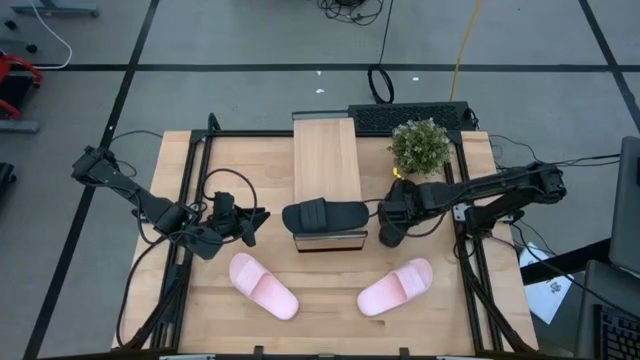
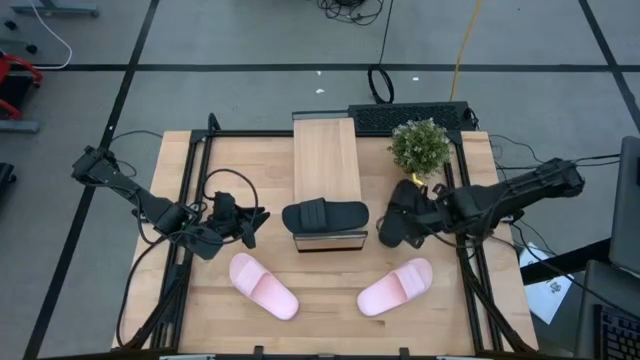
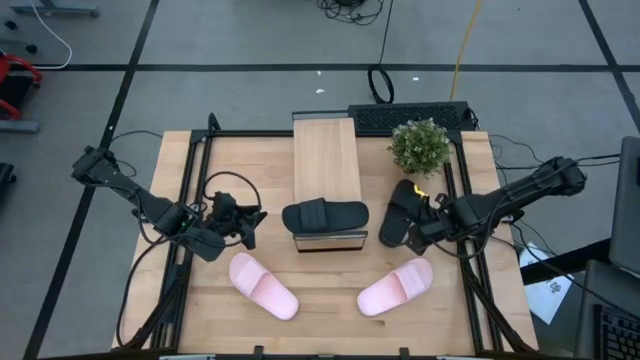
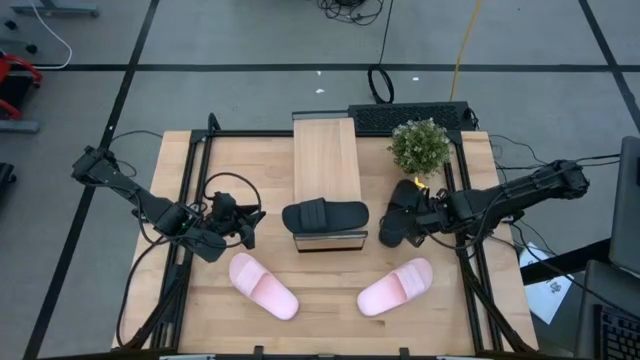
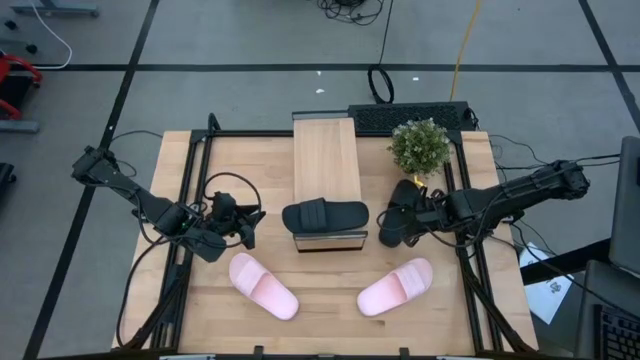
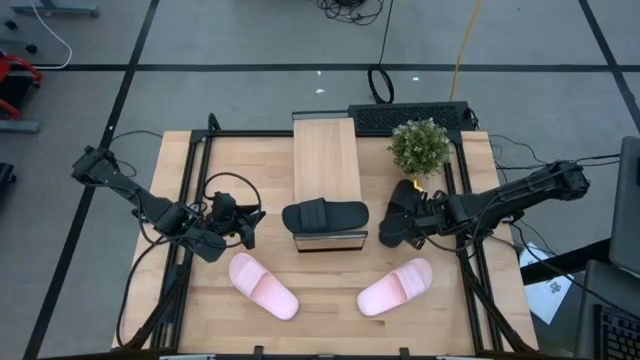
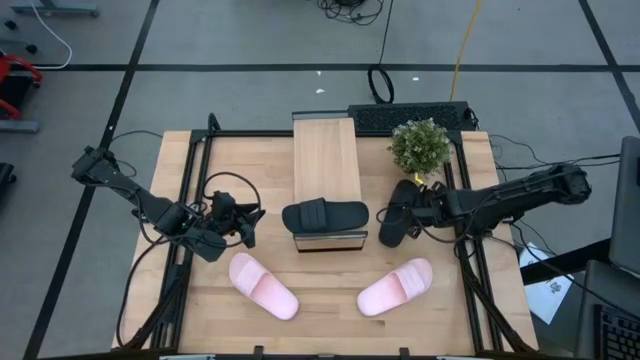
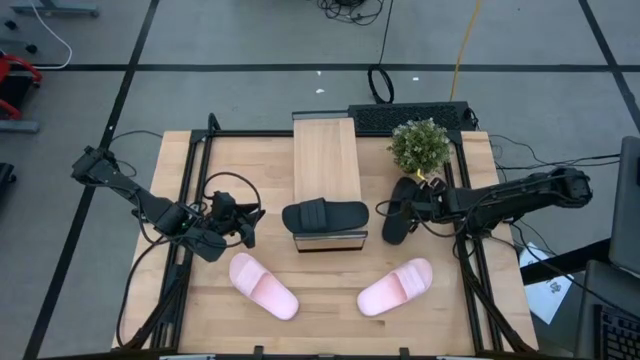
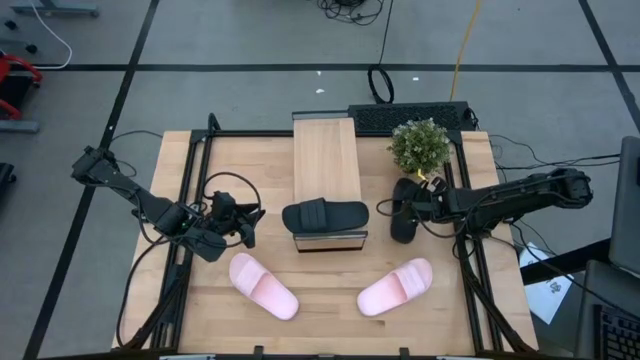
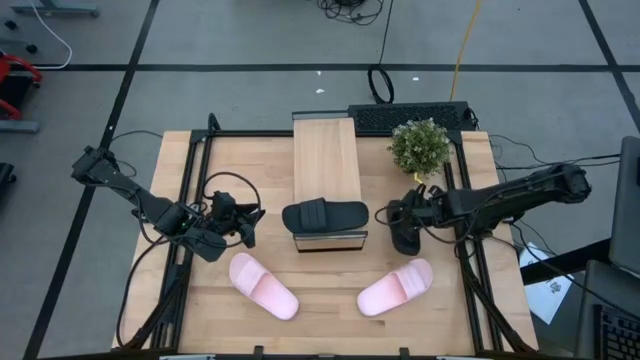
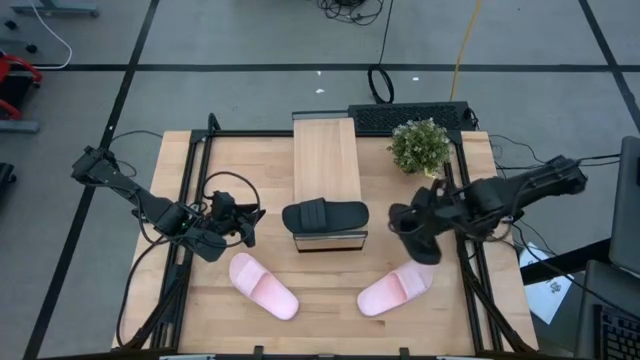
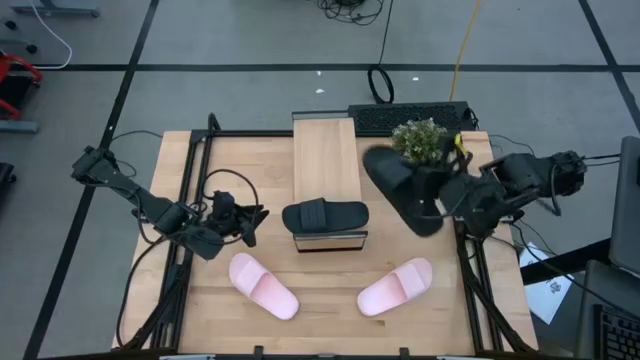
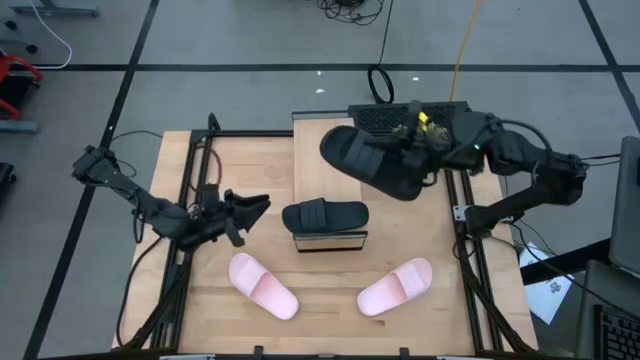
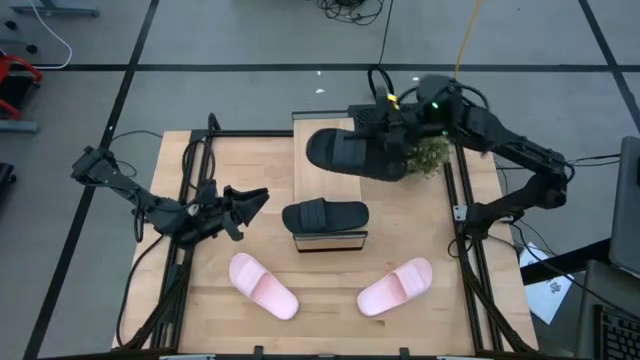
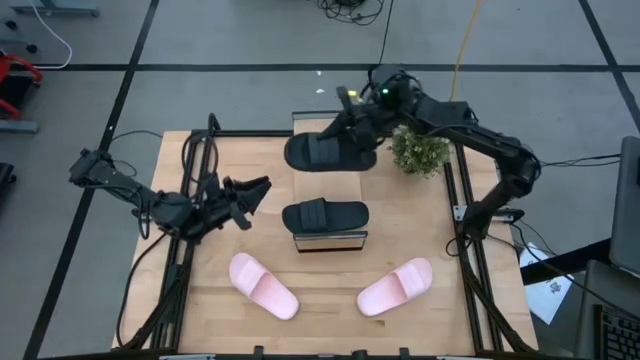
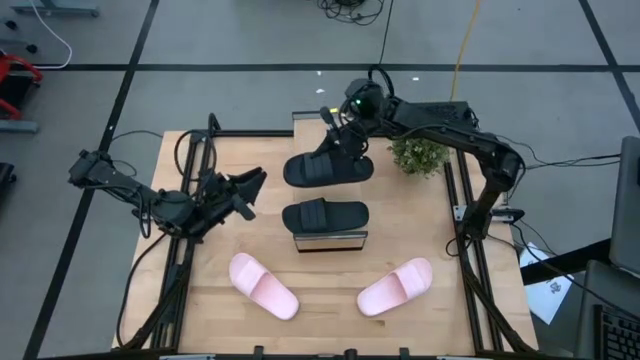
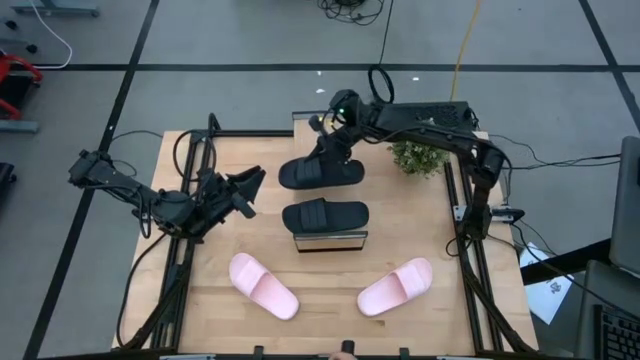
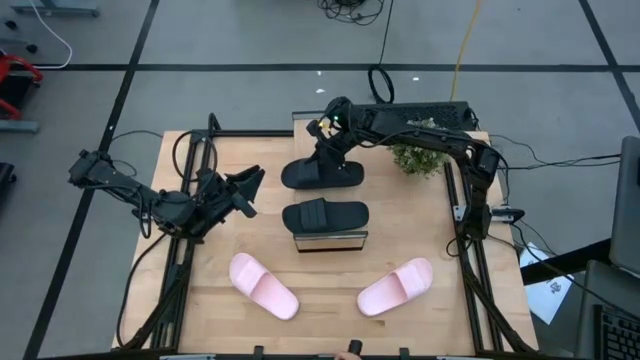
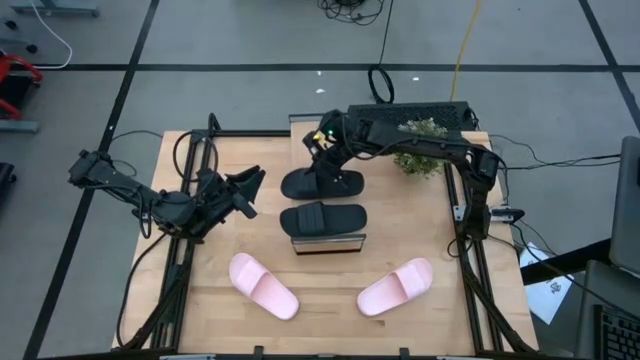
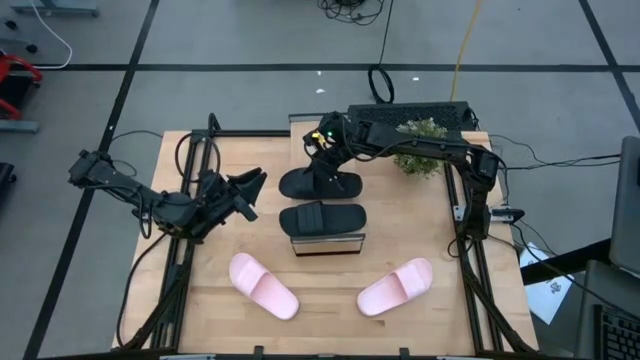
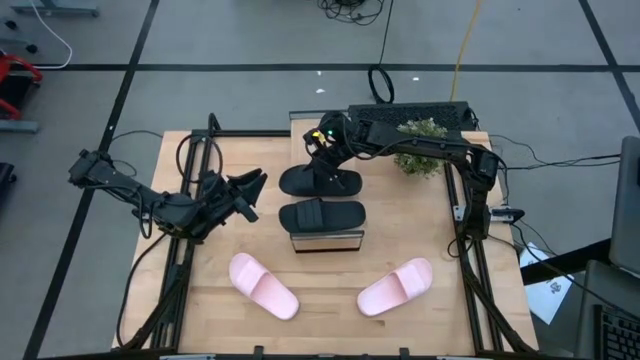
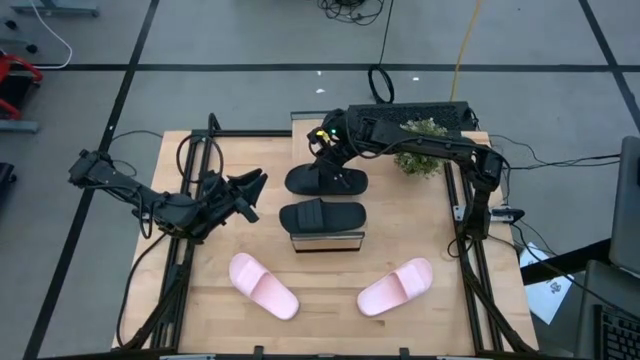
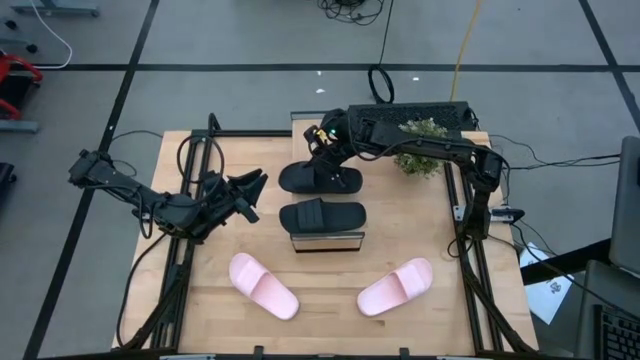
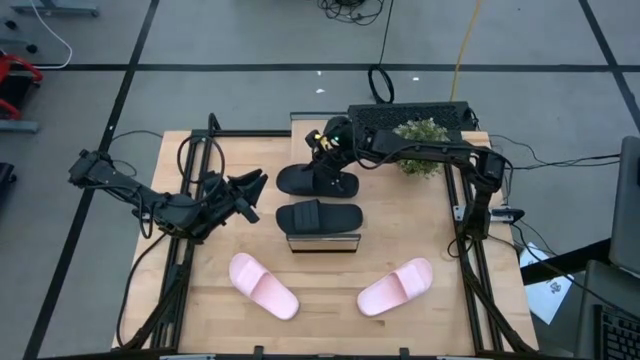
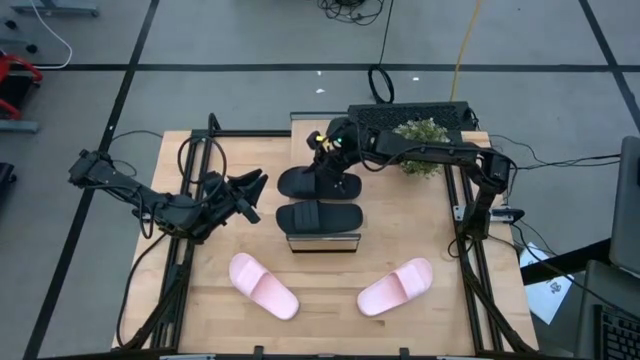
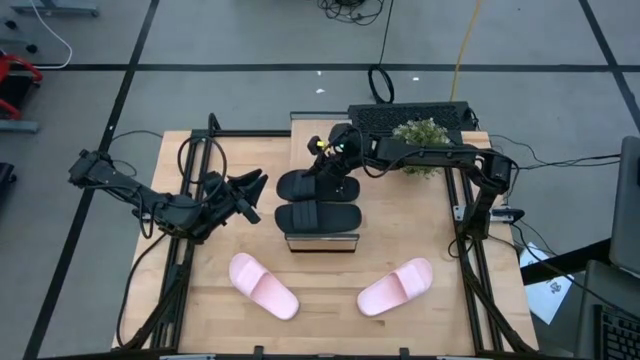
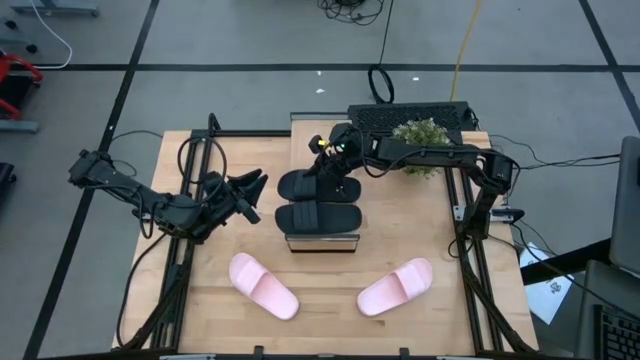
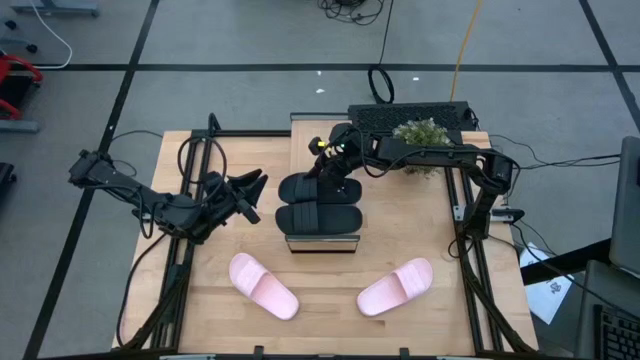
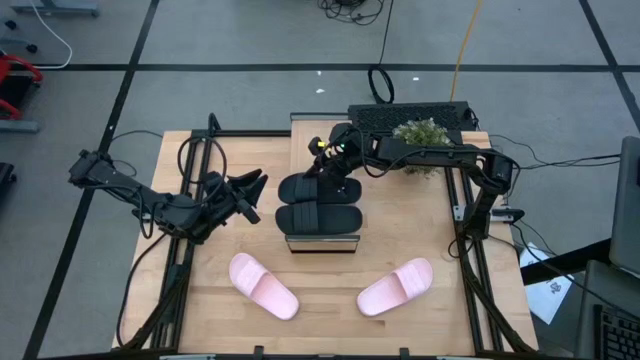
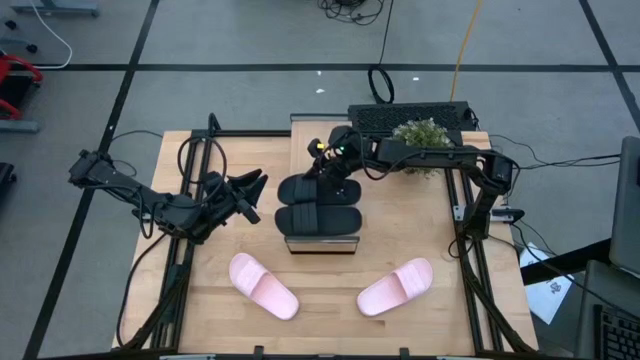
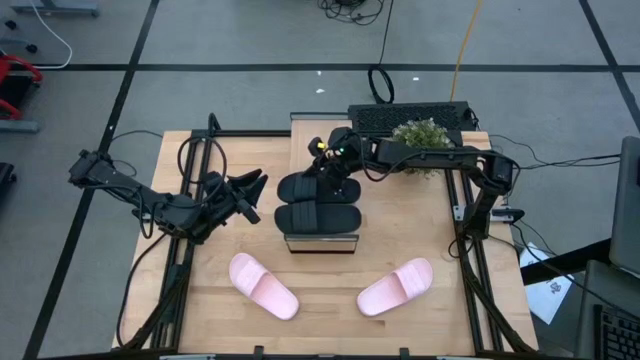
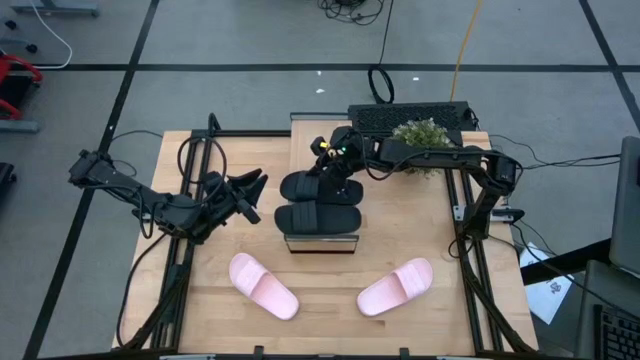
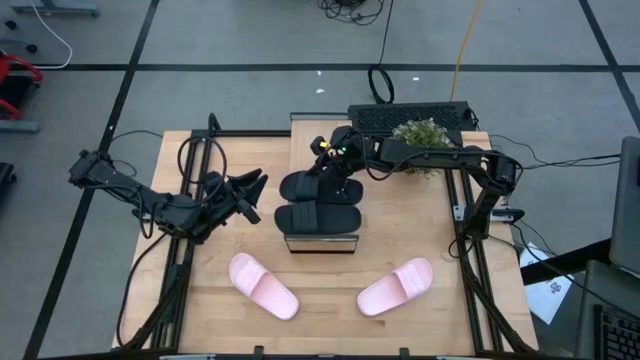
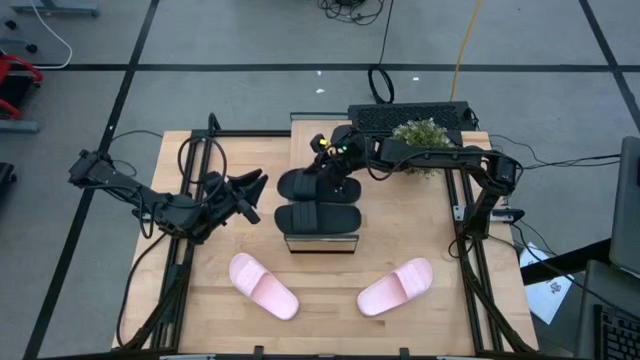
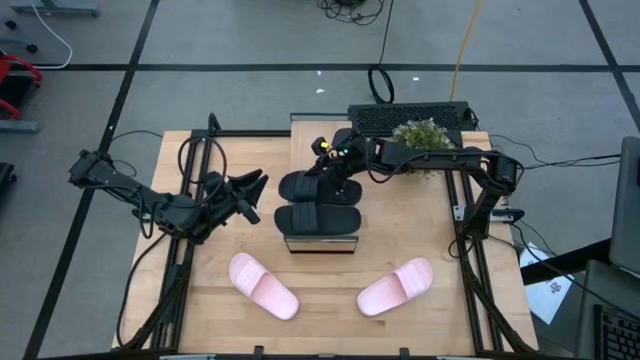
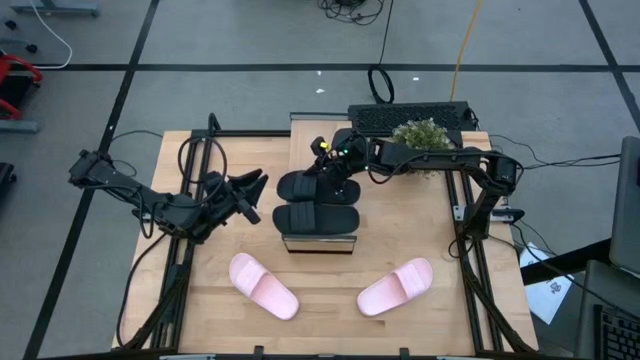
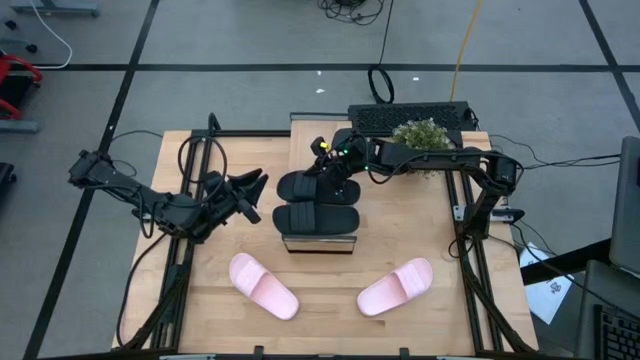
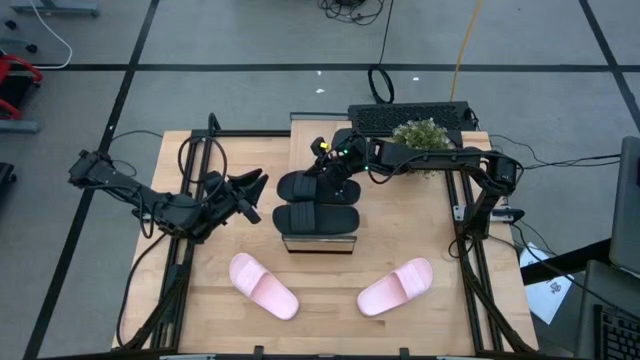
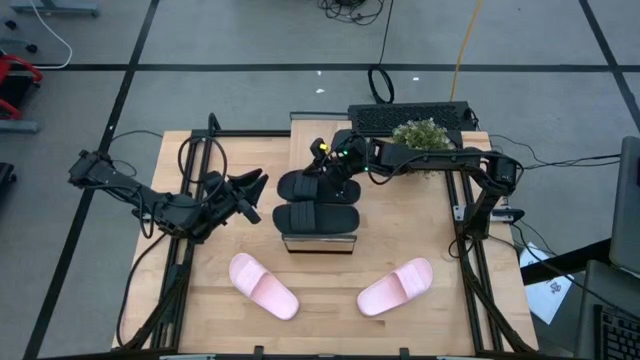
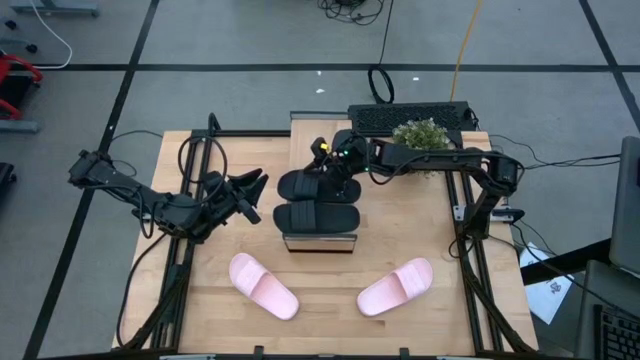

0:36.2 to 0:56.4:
Task: Pick and place slides into the shelf
Put the black slide on the shelf
